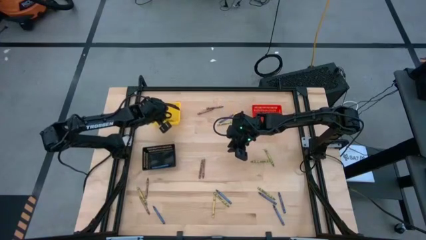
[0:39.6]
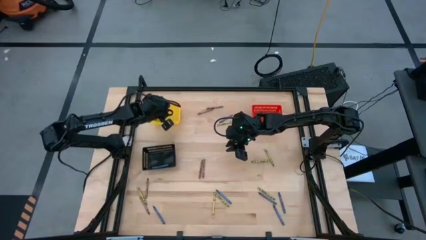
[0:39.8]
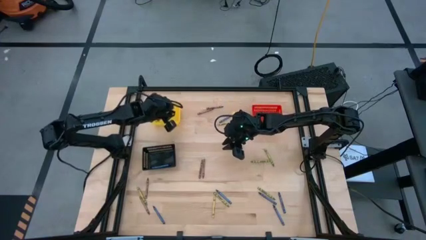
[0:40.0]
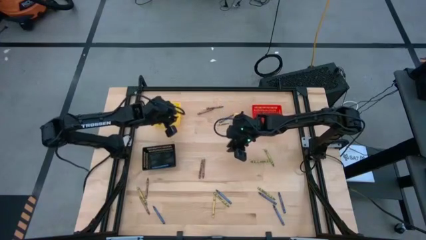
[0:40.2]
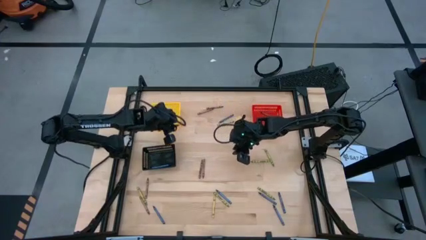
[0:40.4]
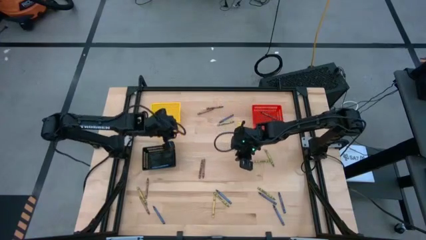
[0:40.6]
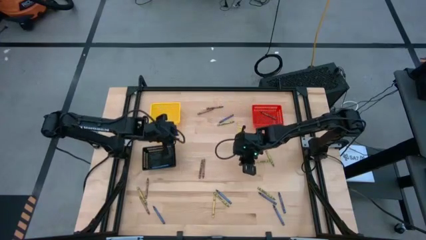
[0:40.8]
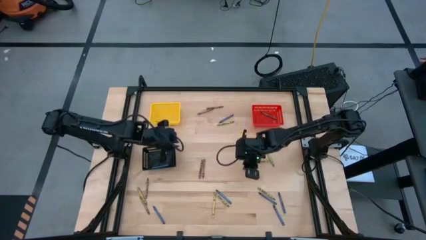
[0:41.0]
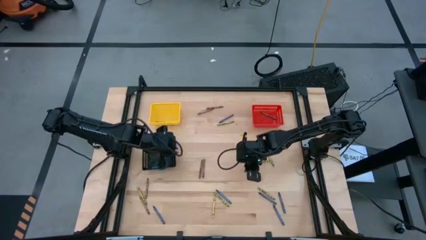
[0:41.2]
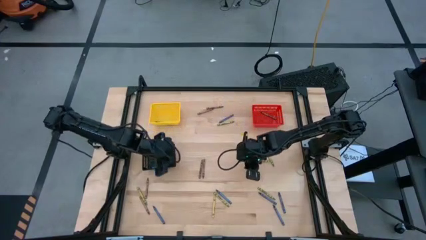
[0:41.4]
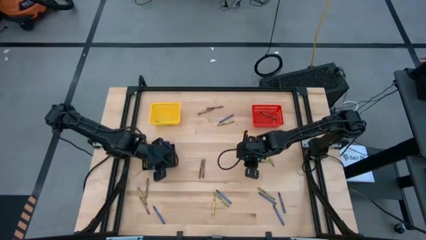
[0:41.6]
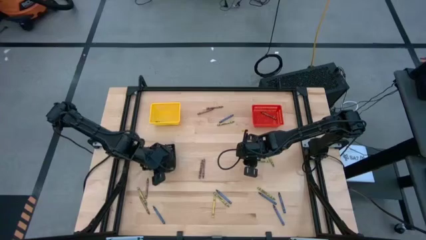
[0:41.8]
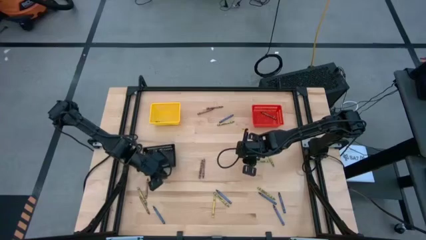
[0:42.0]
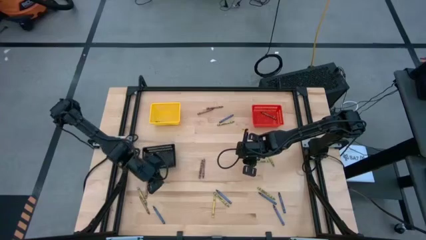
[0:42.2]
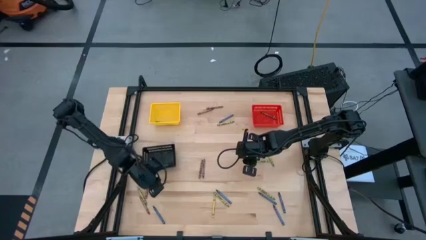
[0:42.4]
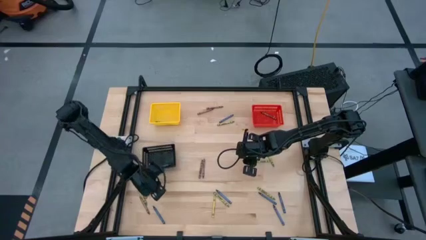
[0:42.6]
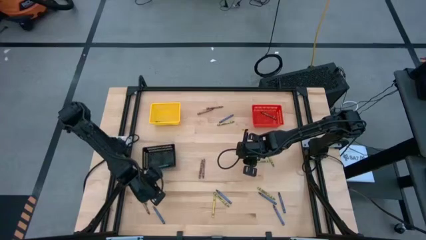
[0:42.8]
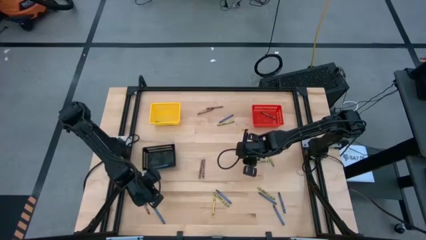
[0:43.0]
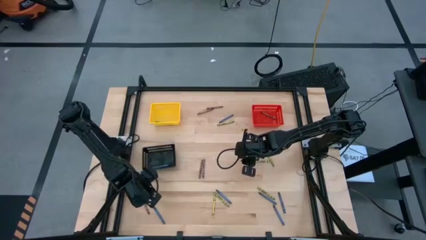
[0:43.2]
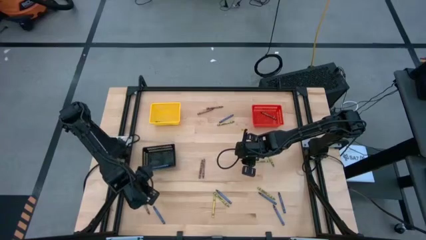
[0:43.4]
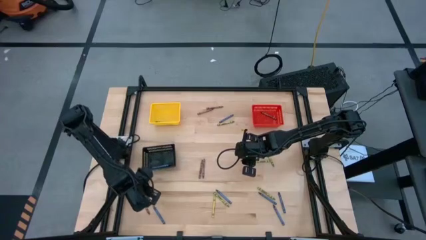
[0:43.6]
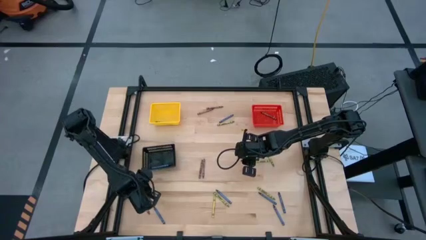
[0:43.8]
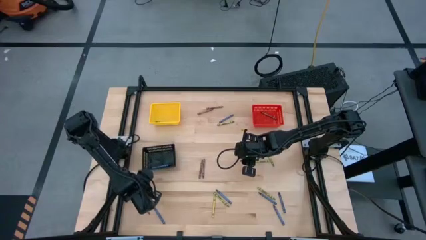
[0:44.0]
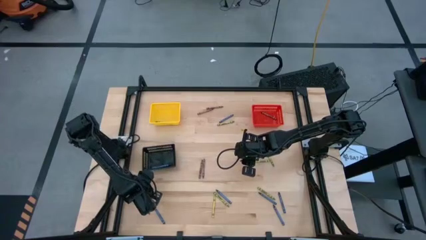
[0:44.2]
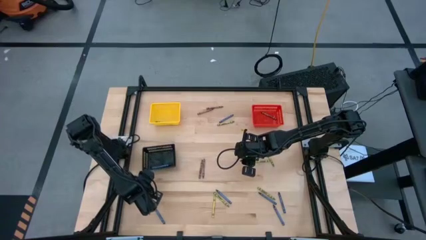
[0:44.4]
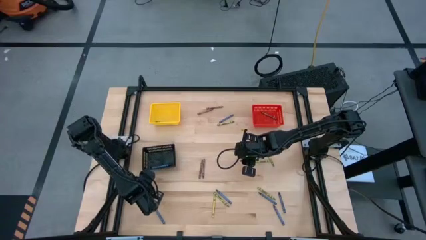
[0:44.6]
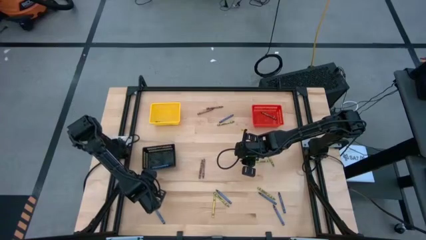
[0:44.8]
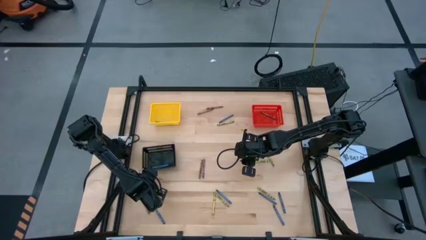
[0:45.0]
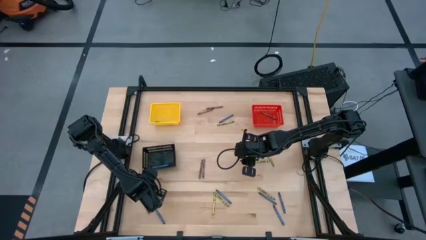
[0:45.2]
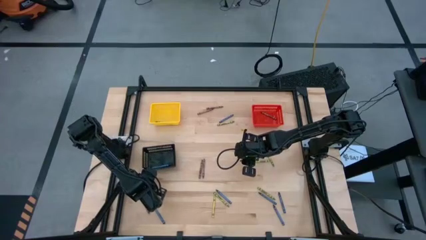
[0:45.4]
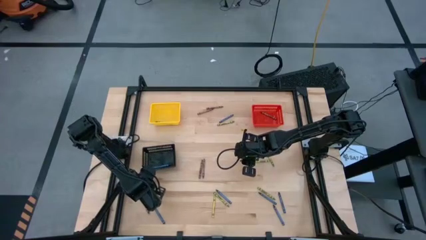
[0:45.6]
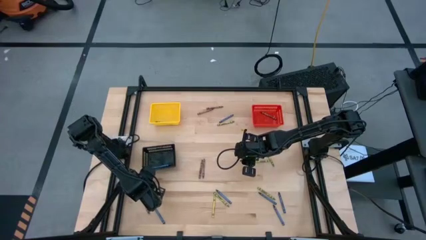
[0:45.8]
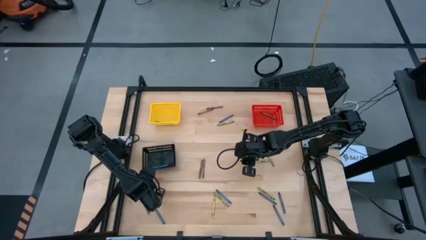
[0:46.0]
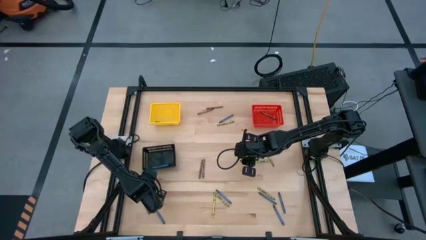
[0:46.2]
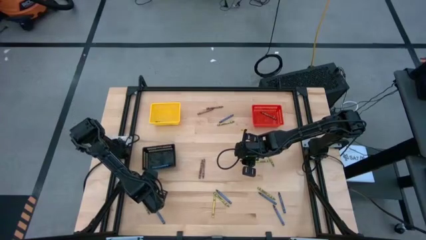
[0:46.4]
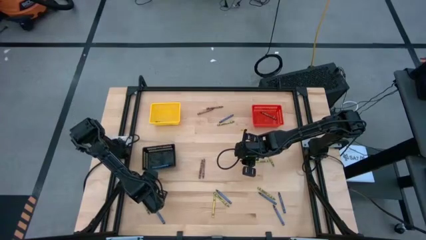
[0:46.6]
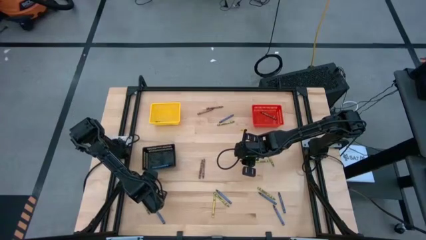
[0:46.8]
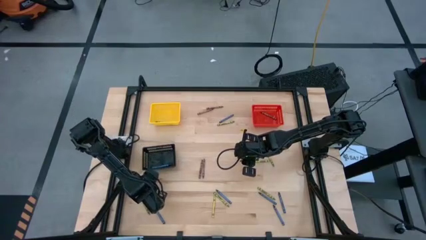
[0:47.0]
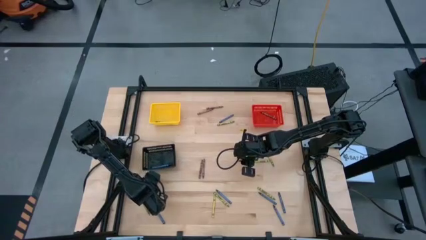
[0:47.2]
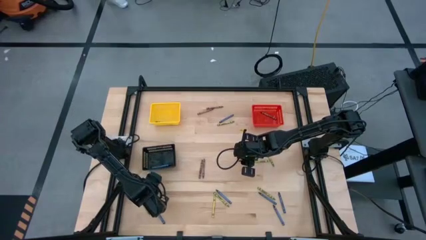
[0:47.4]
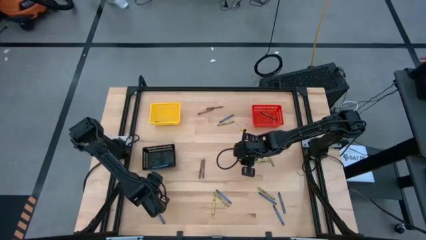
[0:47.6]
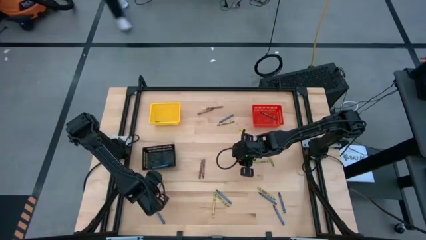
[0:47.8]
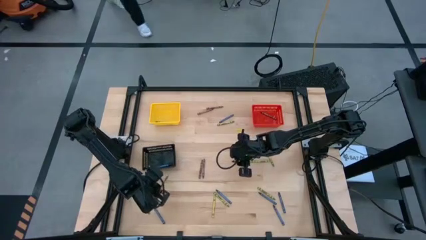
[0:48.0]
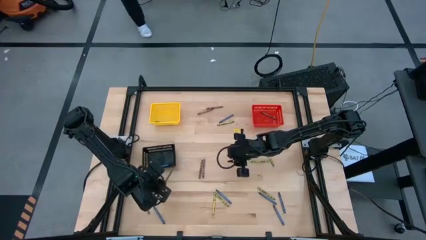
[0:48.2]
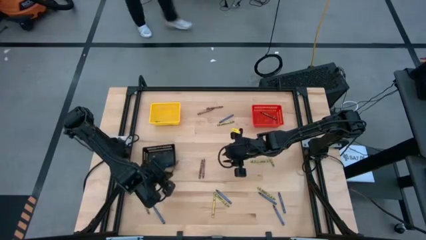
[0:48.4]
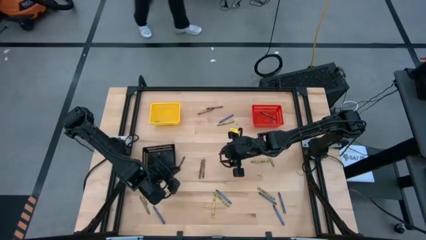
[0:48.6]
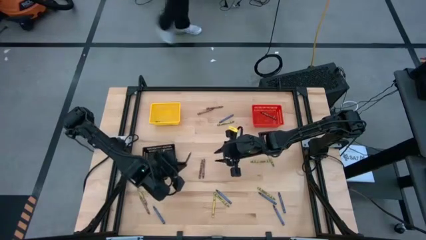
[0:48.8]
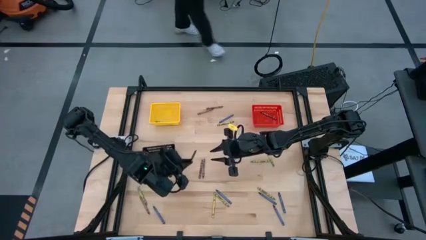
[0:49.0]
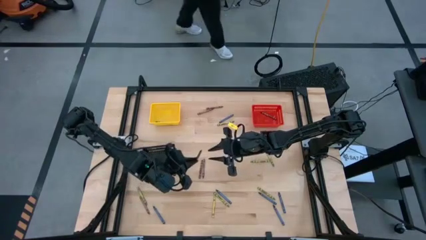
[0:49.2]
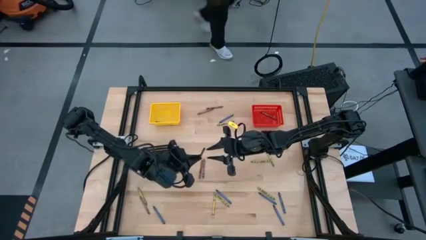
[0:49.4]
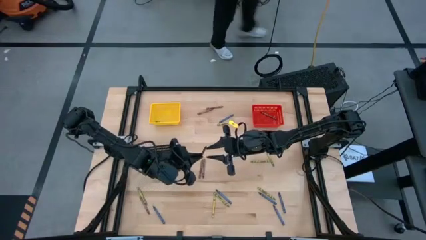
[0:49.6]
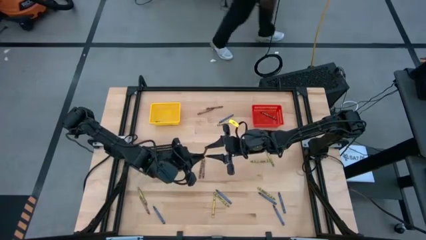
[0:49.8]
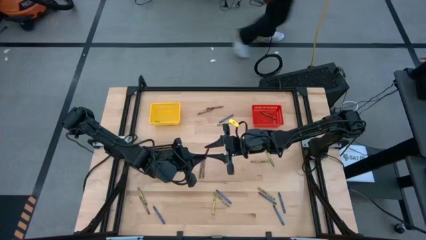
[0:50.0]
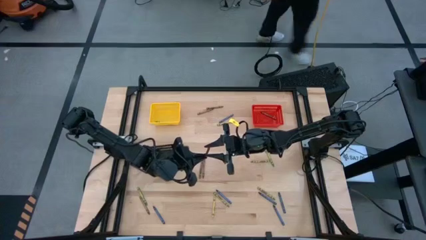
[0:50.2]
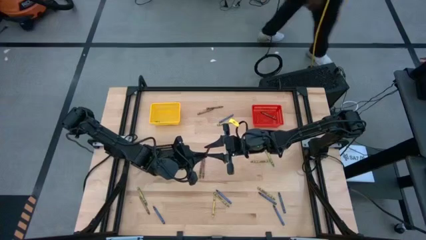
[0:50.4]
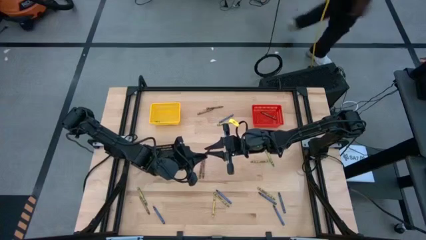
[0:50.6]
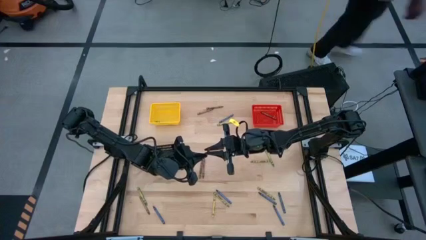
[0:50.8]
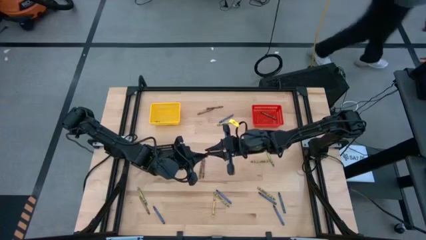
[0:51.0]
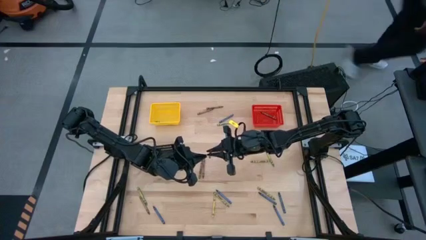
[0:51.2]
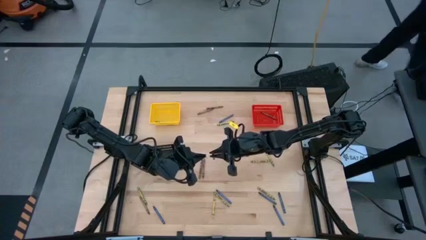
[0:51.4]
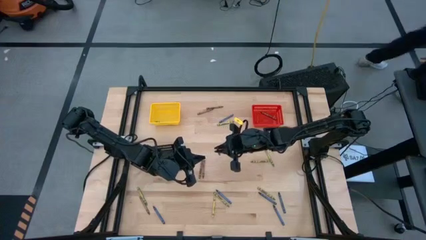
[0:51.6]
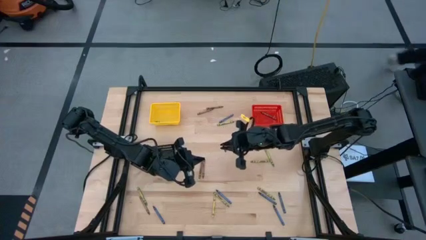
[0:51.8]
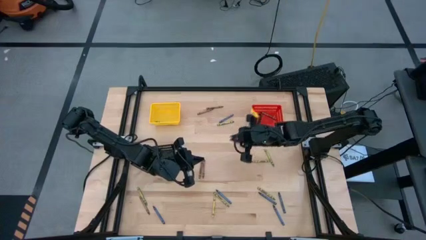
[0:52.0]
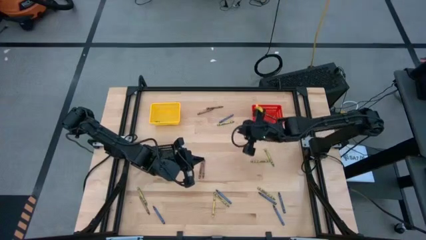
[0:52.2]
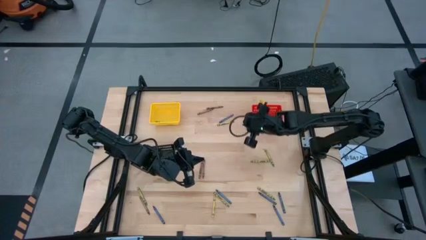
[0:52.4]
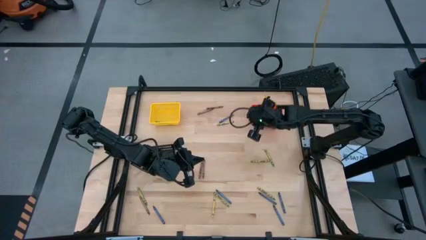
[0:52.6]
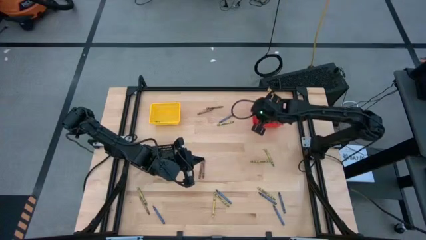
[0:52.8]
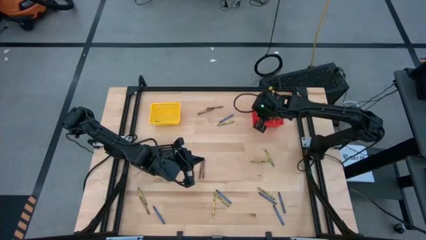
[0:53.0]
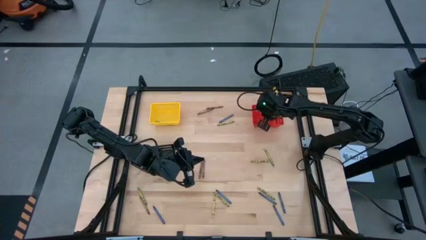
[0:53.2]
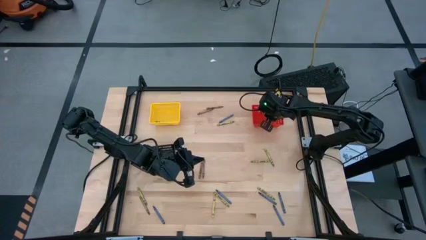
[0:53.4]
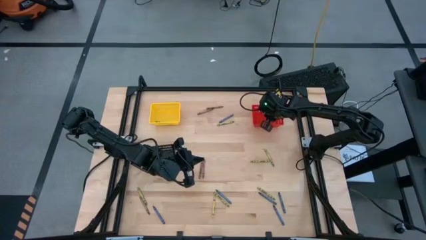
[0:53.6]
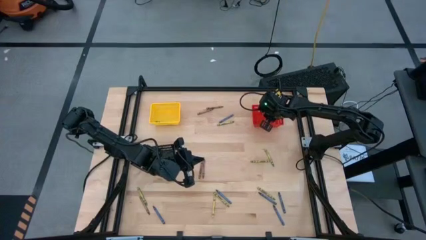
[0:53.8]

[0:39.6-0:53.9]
Task: Sort crayons
Put the brown crayon into the red bin
